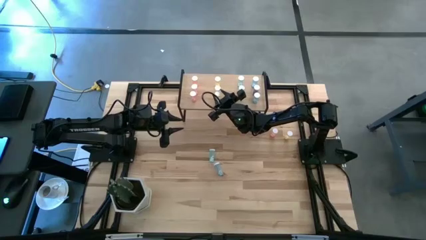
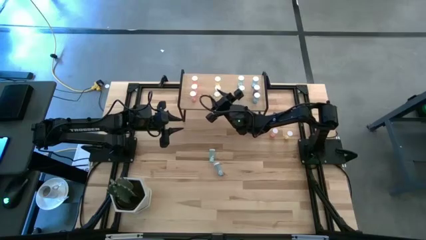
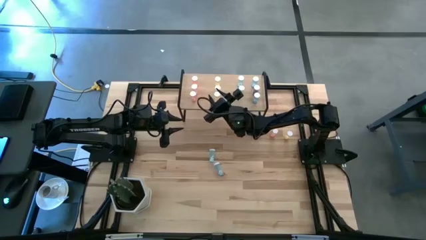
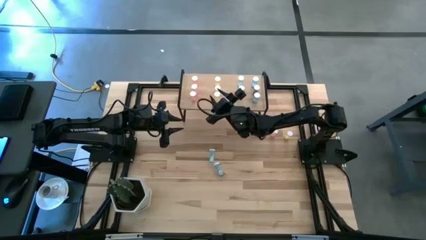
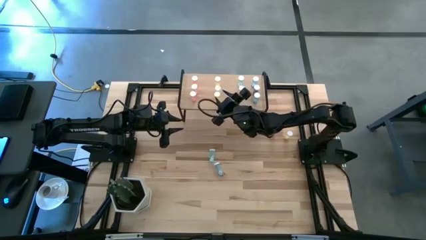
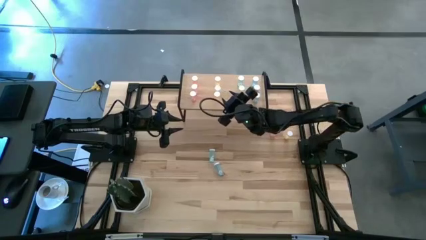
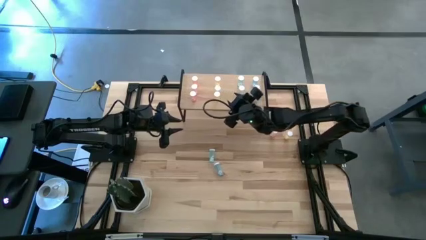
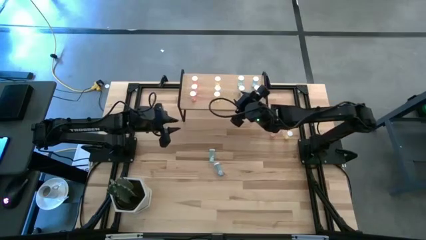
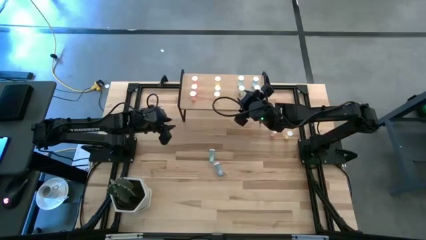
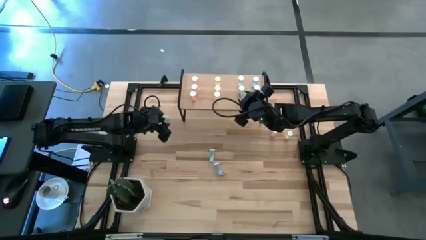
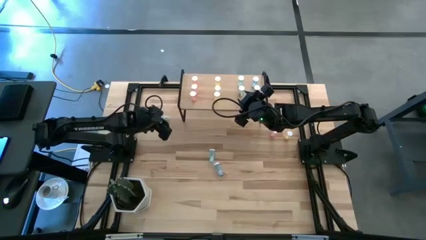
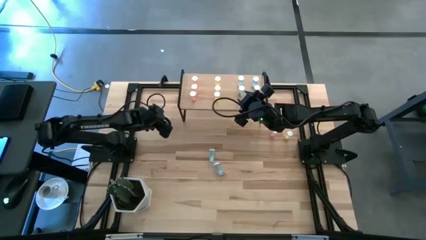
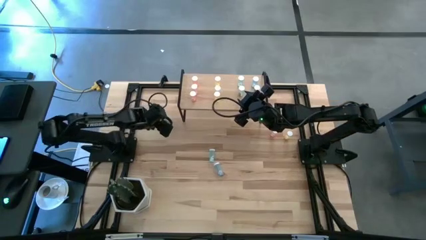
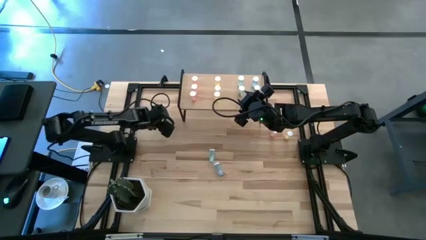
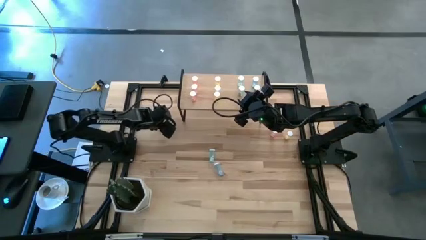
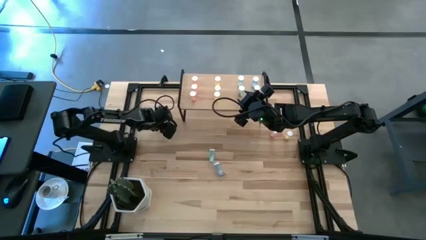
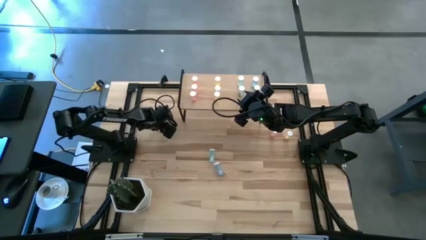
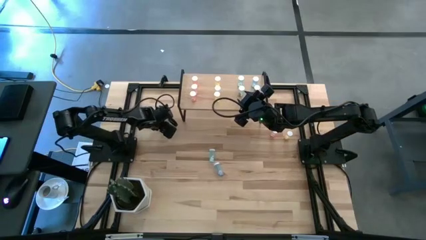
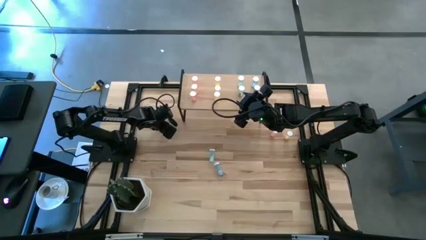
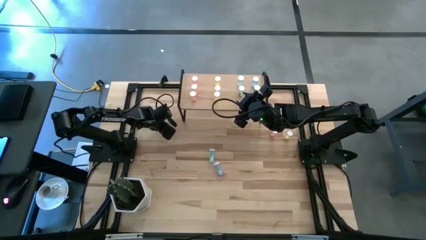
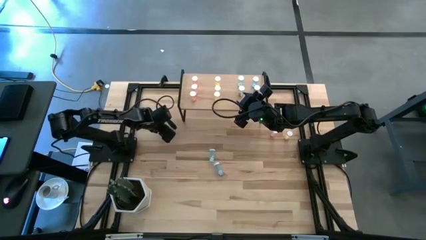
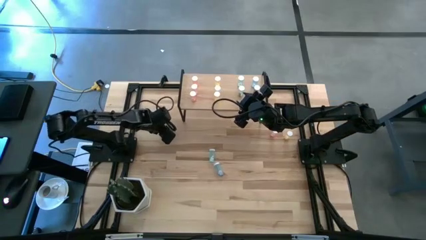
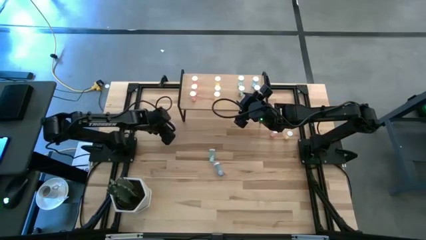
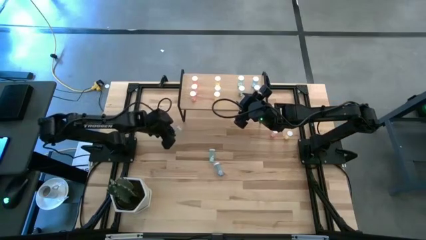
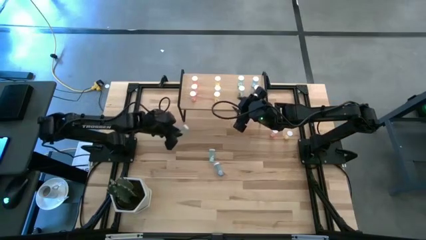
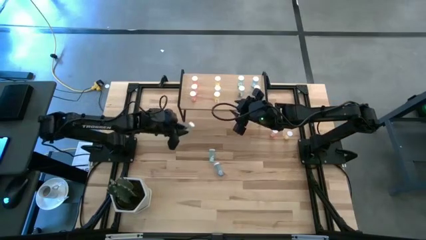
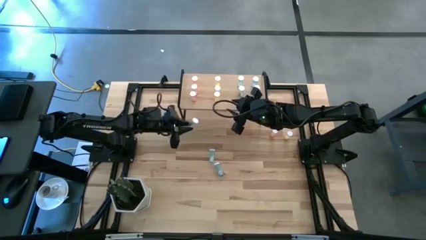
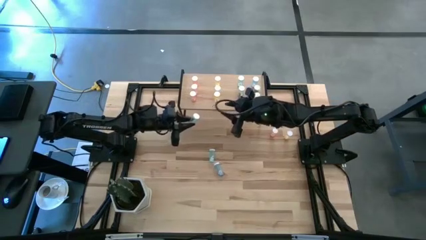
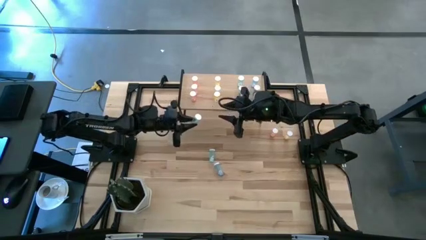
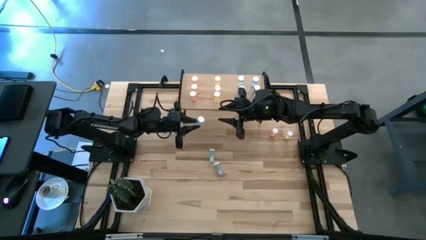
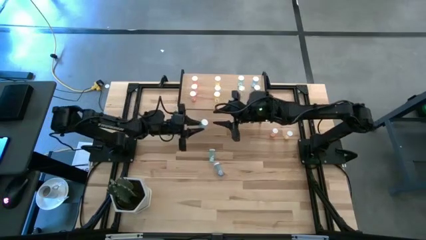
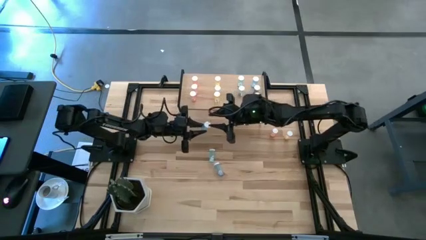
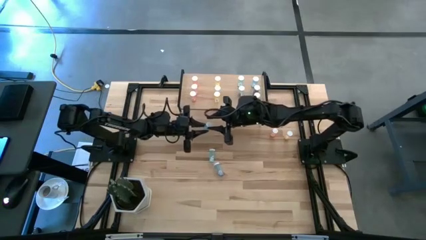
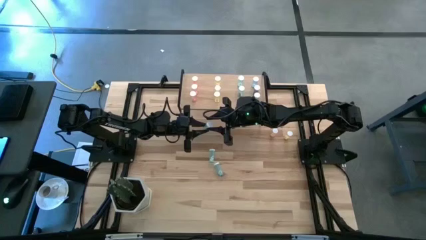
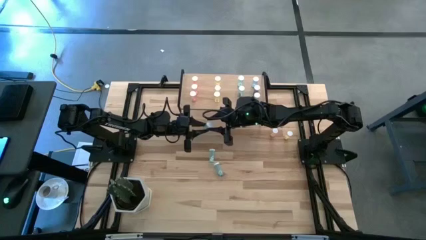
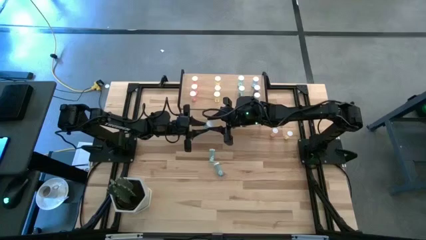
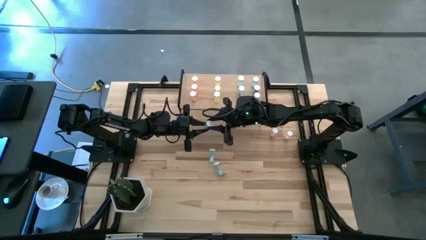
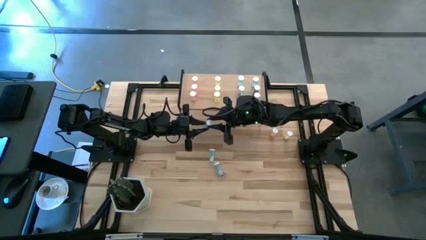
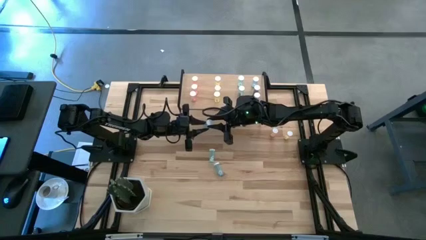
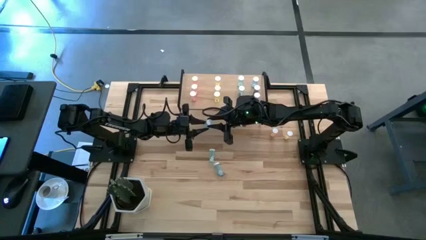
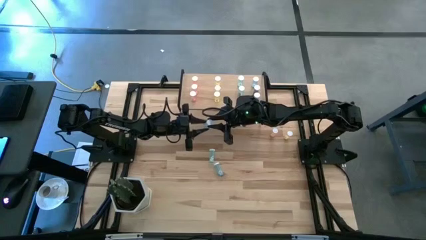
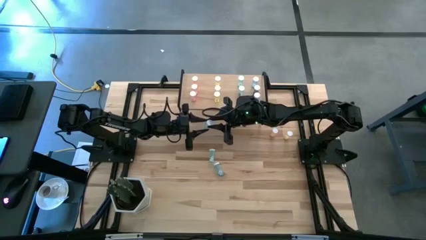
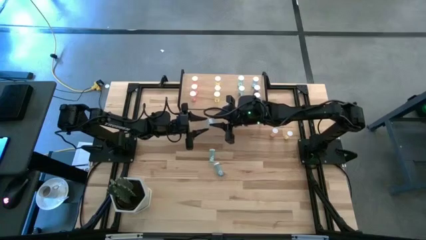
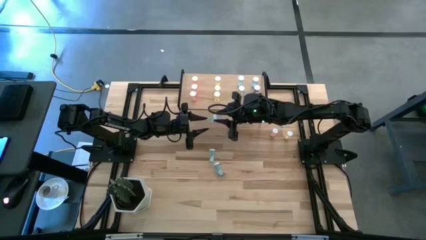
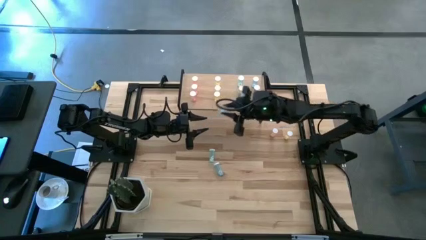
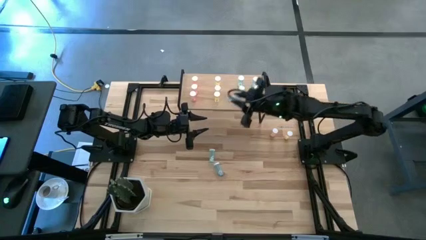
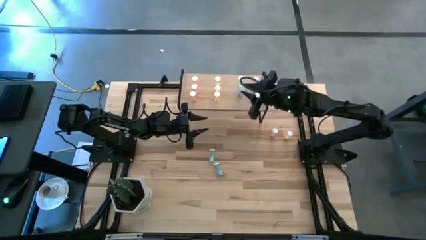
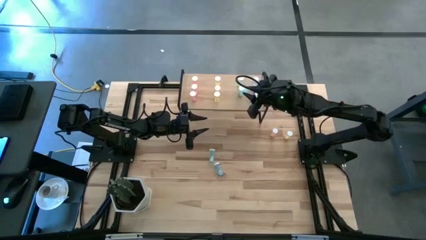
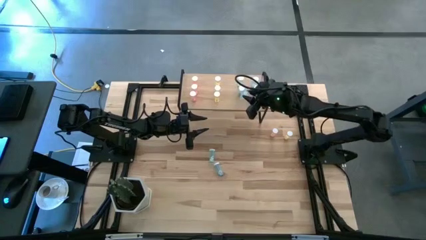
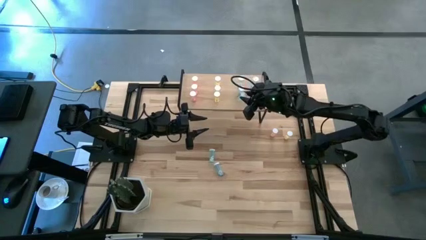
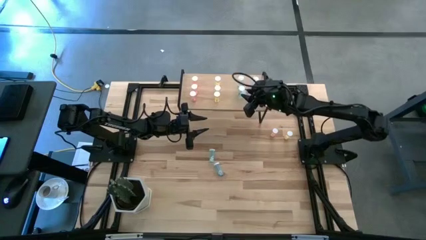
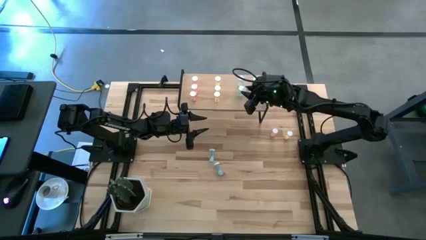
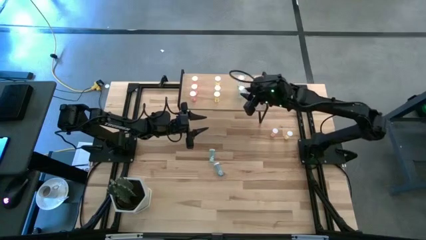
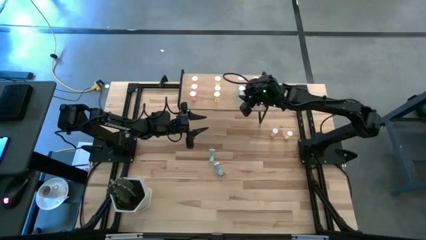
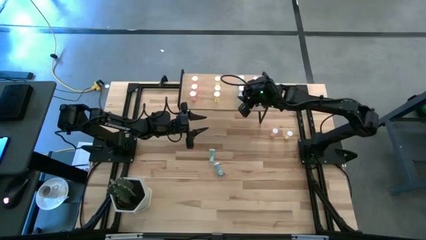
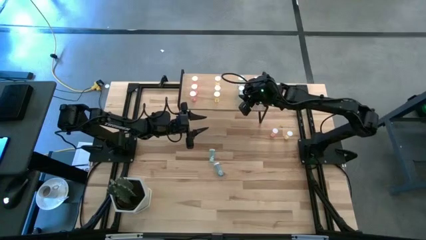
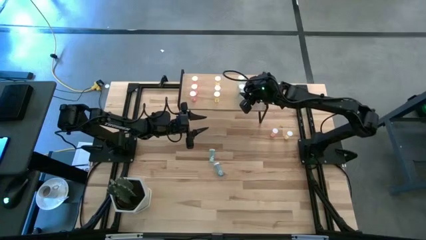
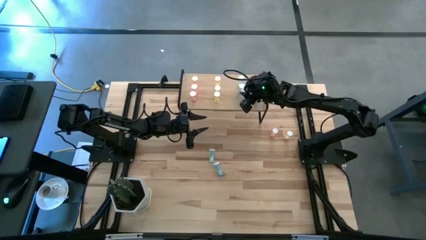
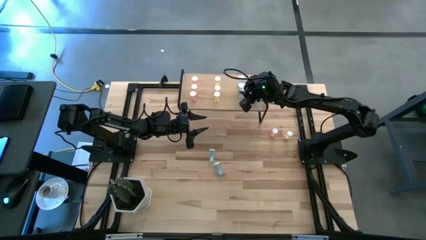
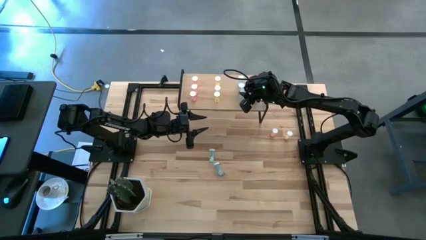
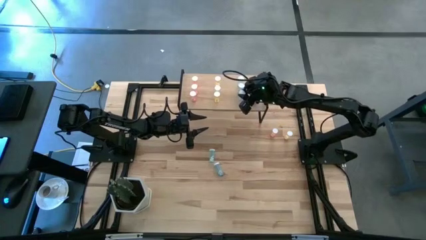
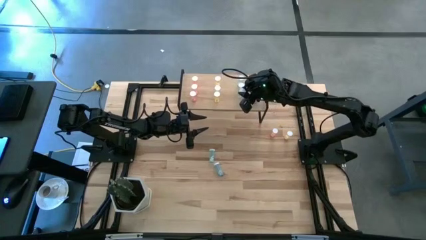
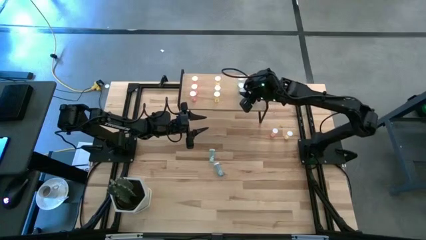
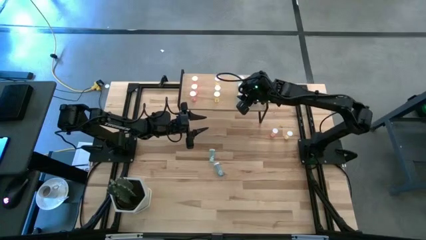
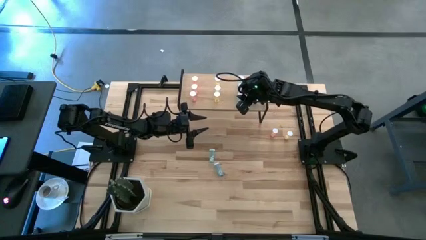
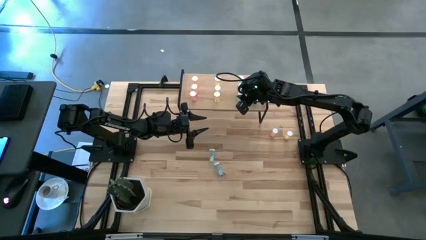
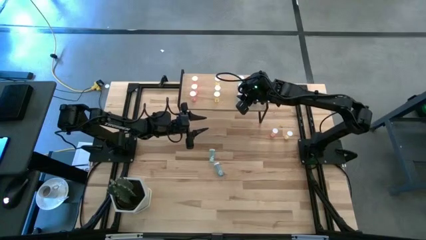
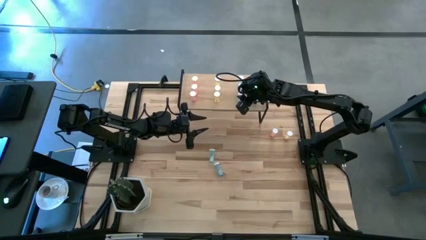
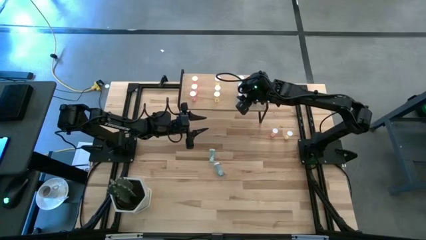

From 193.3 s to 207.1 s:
Task: Pick and place medicine bottles onto shelf by color
Put the light blue pill bottle on the shelf aligned with the other light blue pill bottles
